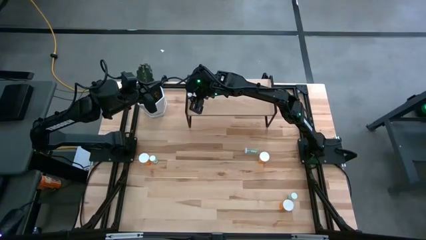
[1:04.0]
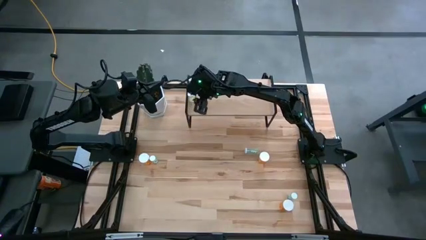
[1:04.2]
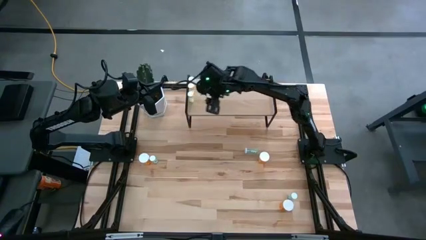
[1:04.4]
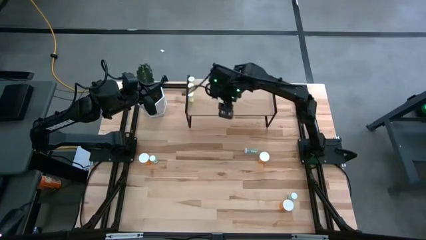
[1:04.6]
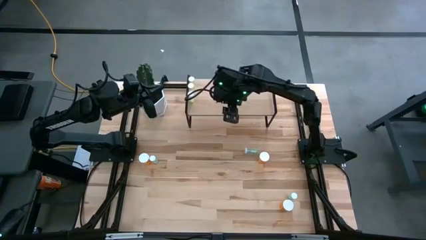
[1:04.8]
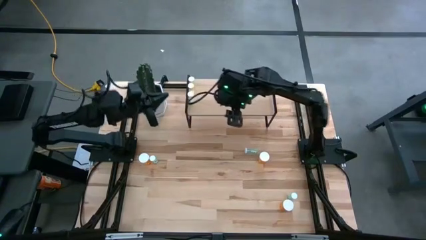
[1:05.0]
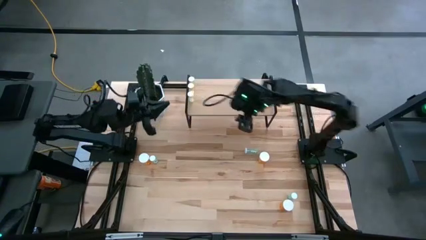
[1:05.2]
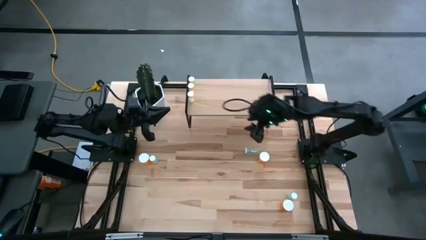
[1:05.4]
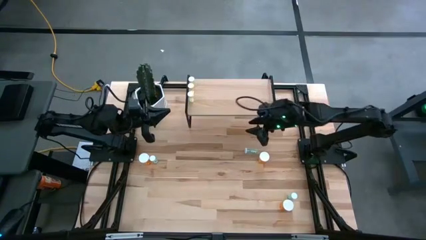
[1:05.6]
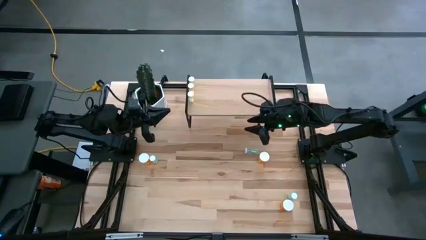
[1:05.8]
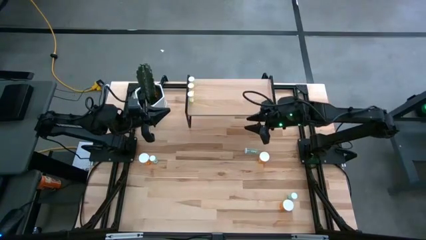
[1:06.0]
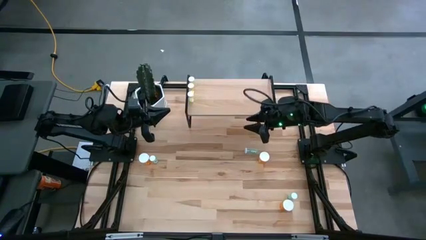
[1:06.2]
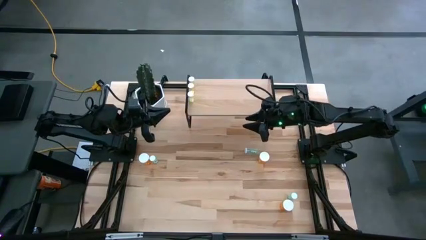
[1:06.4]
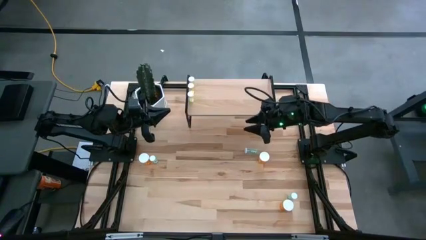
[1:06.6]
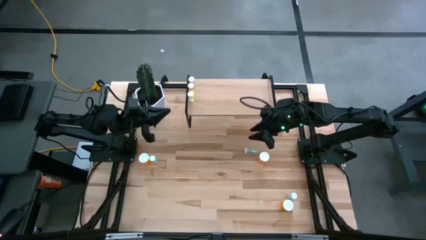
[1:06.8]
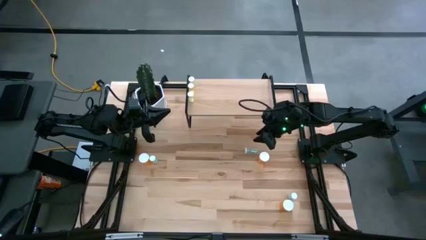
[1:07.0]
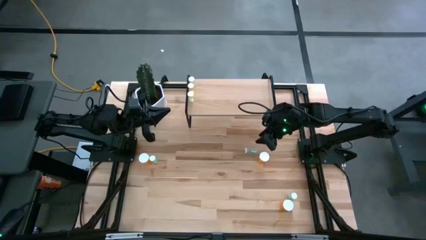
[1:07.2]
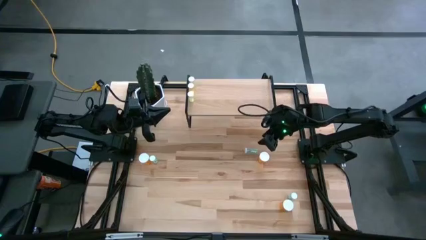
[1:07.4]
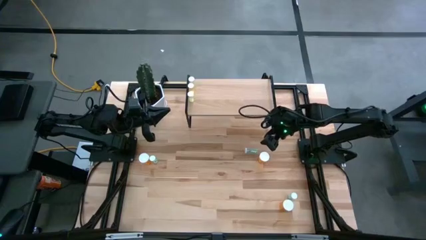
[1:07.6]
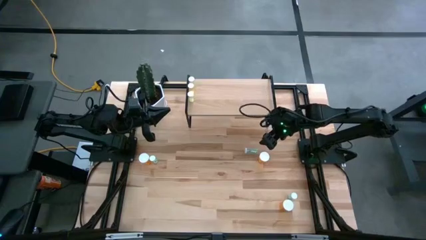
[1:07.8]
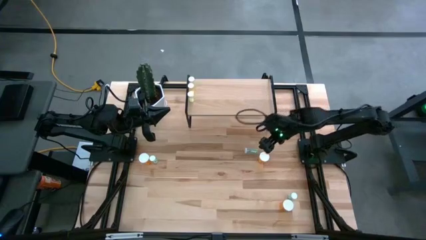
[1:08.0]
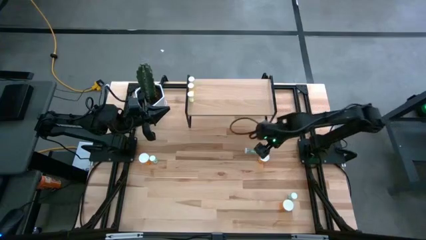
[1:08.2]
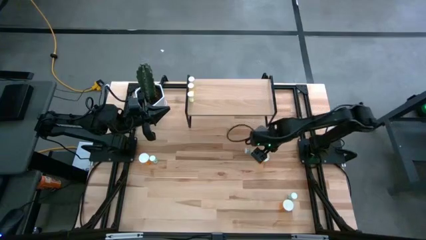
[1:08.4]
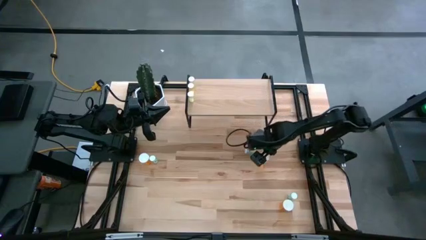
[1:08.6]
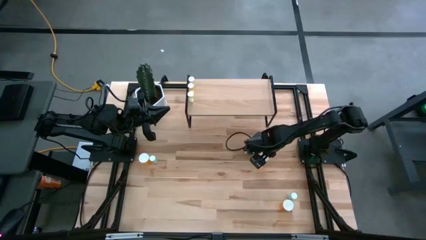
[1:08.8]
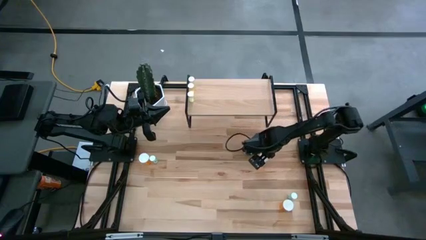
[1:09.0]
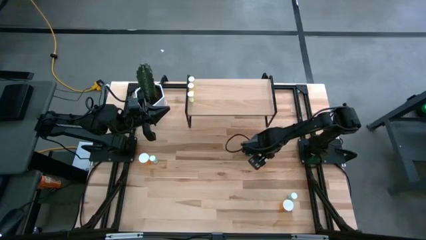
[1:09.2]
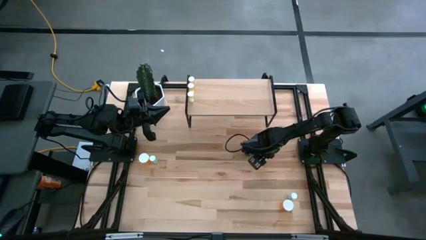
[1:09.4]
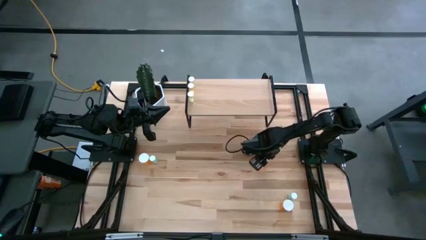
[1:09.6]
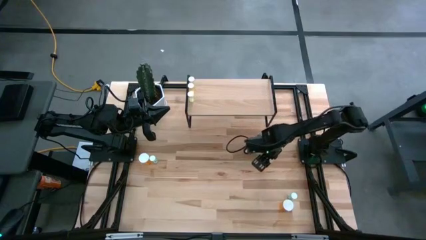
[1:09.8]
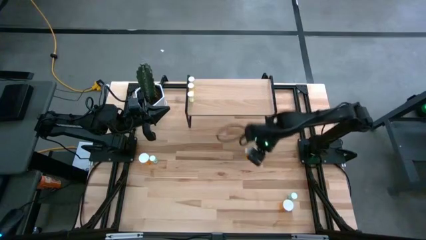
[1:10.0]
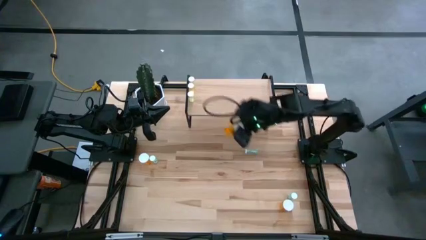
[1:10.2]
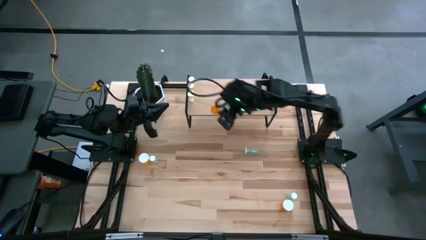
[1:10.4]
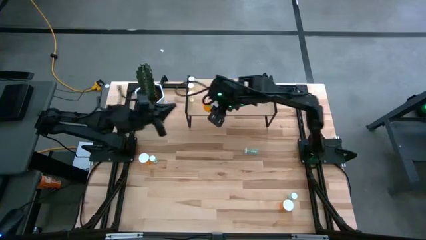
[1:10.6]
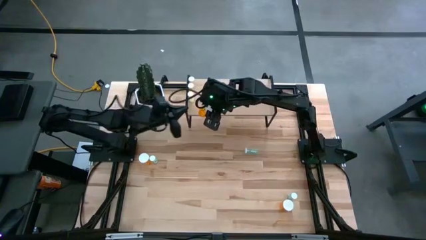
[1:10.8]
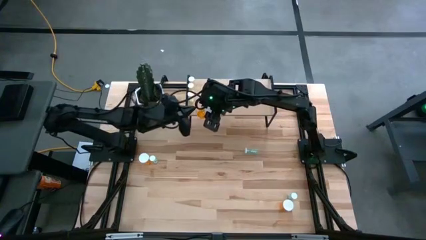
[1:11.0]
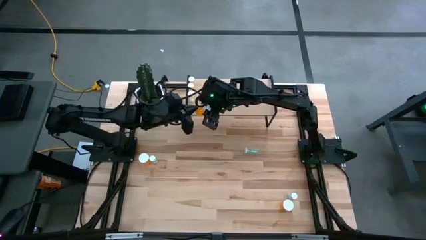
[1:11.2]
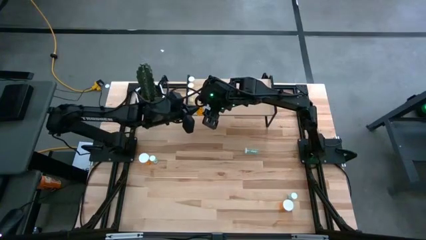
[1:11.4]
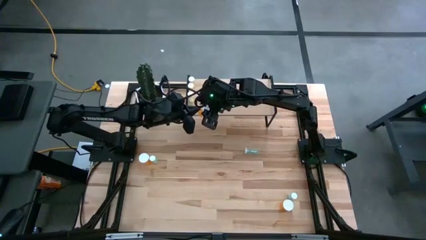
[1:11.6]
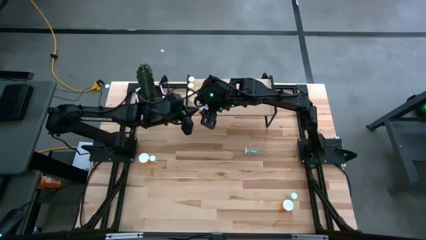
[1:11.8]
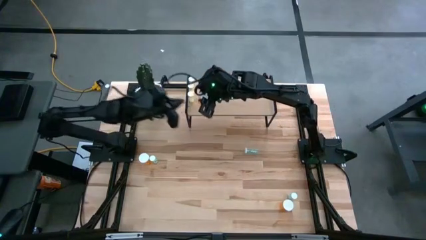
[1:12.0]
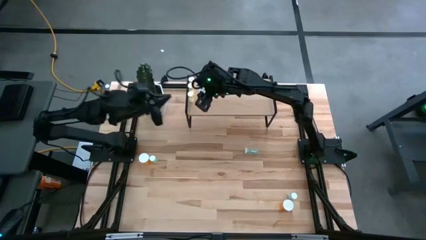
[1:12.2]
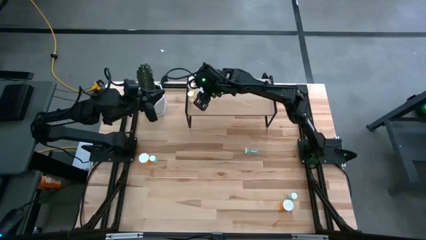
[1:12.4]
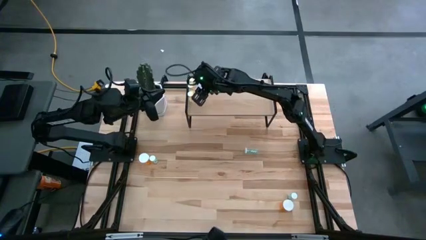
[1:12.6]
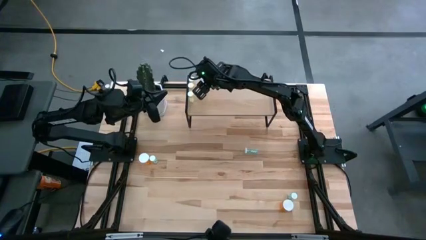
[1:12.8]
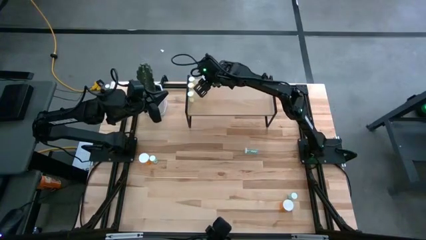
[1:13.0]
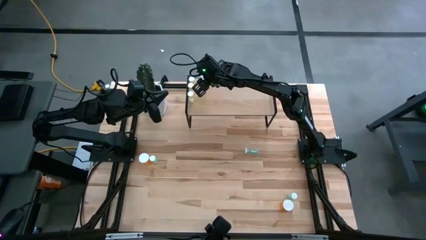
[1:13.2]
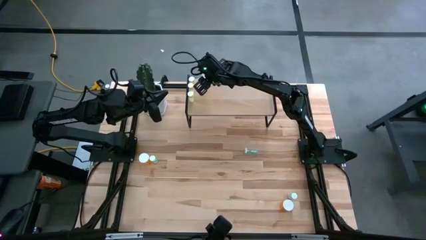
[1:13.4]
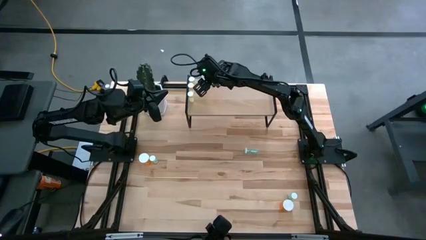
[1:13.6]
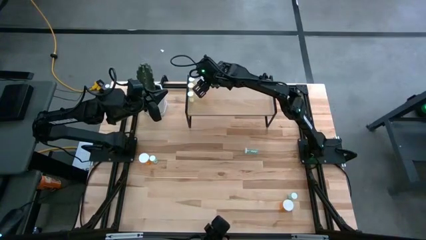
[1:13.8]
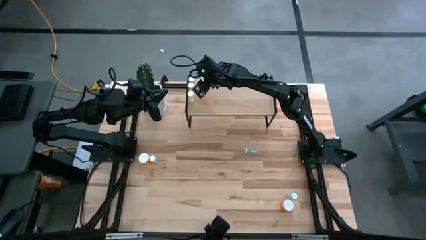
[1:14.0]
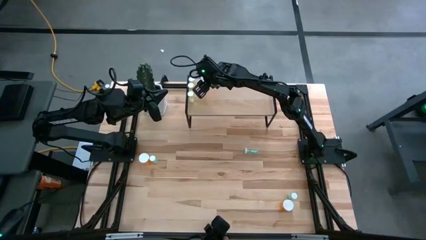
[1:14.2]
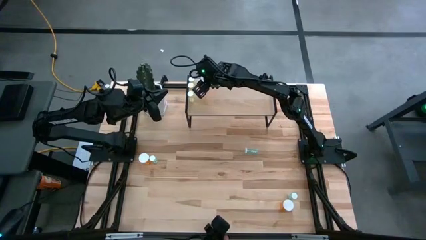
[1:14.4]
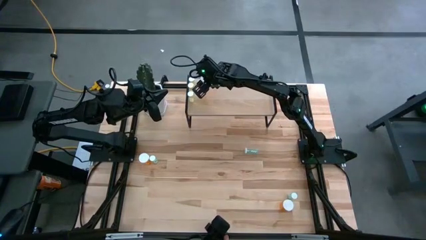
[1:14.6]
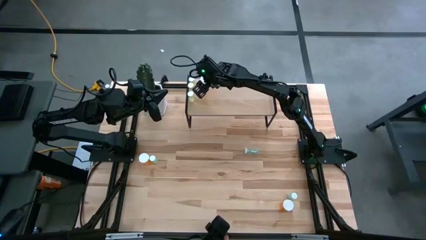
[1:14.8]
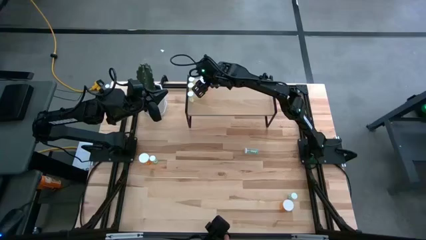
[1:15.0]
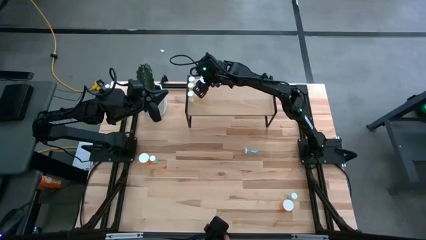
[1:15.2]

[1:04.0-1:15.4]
Task: Pick and place medicine bottles onto shelf by color
Put the top right orange pill bottle on the shelf

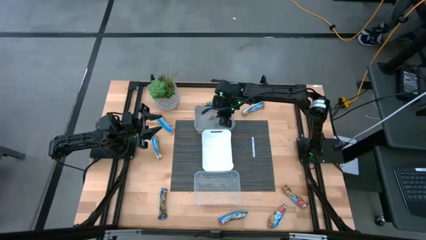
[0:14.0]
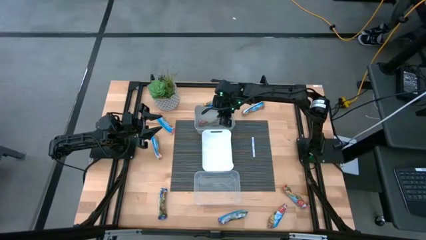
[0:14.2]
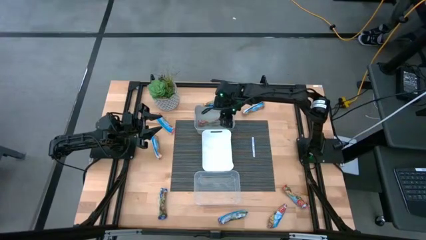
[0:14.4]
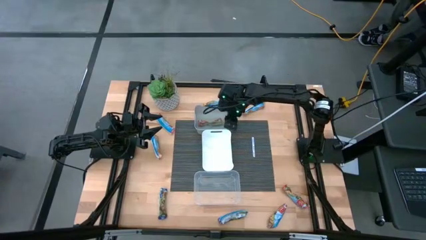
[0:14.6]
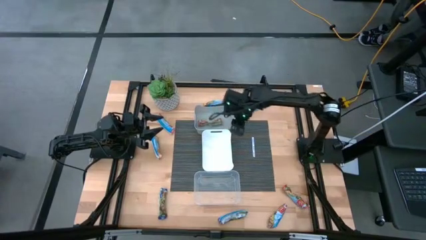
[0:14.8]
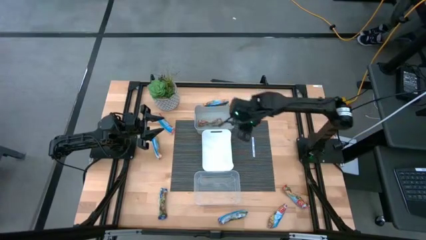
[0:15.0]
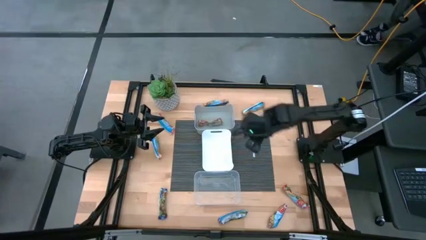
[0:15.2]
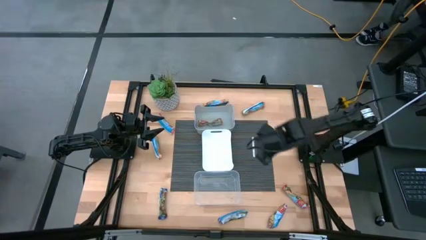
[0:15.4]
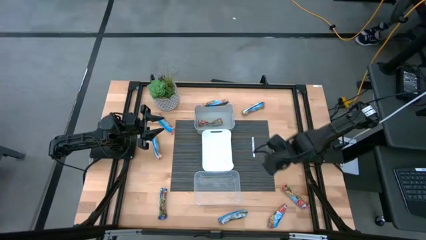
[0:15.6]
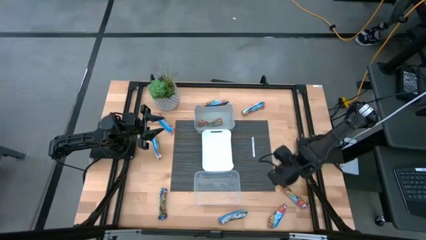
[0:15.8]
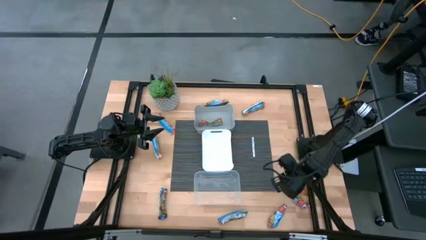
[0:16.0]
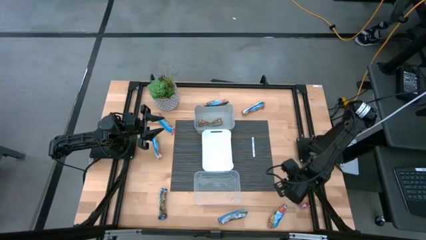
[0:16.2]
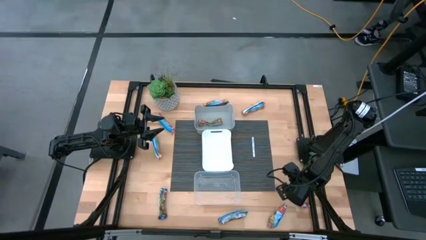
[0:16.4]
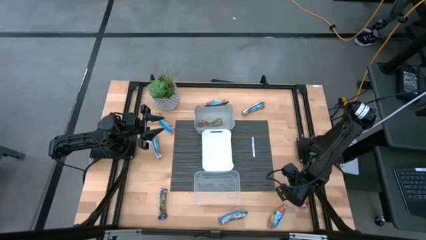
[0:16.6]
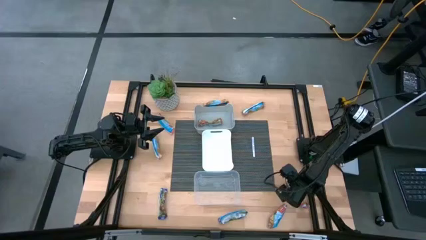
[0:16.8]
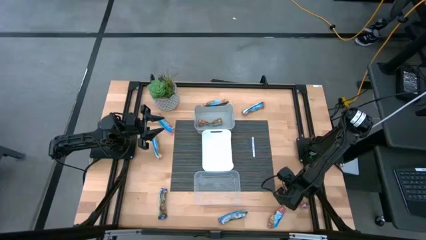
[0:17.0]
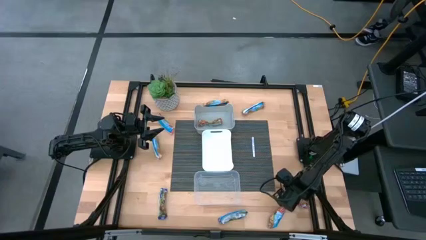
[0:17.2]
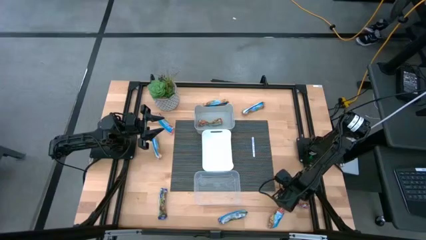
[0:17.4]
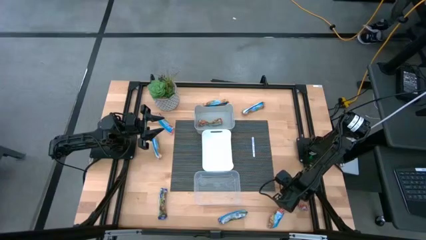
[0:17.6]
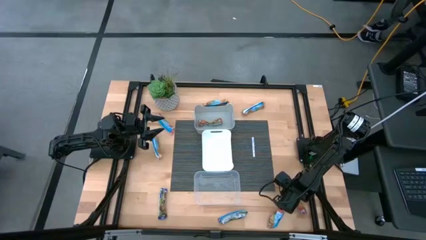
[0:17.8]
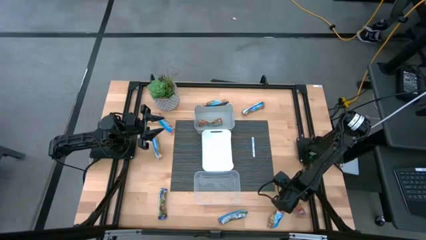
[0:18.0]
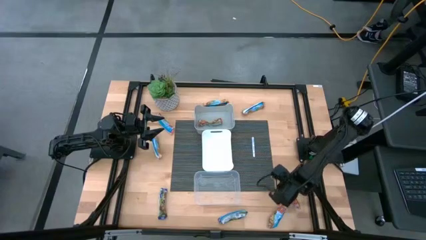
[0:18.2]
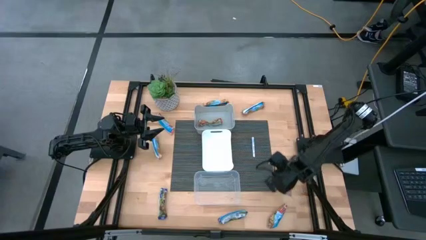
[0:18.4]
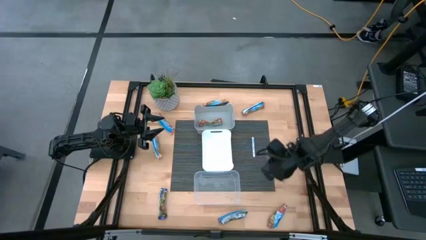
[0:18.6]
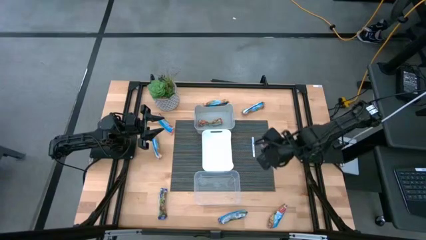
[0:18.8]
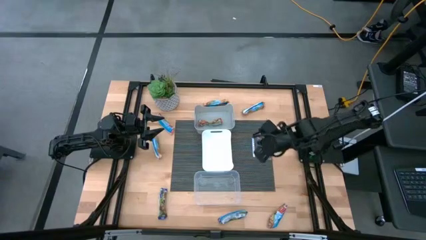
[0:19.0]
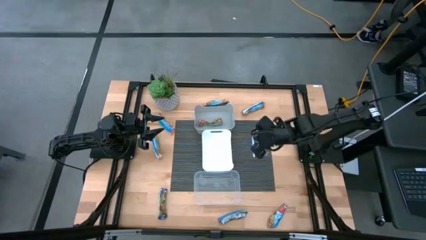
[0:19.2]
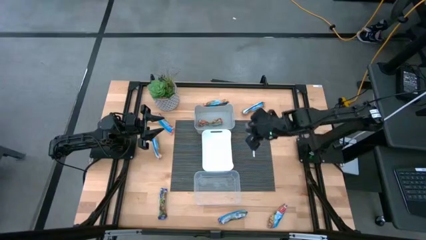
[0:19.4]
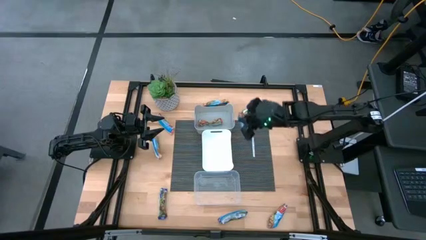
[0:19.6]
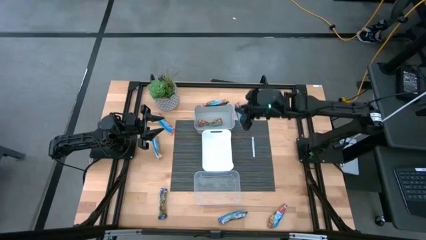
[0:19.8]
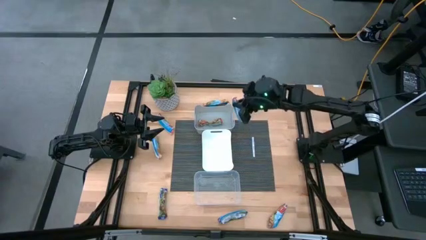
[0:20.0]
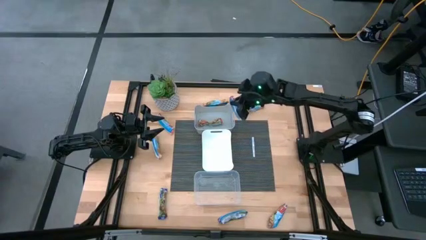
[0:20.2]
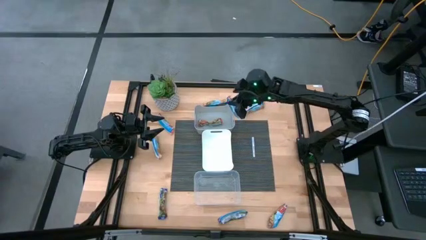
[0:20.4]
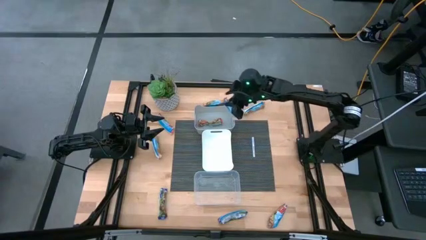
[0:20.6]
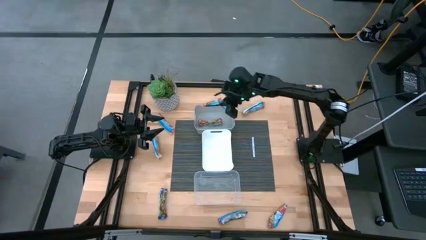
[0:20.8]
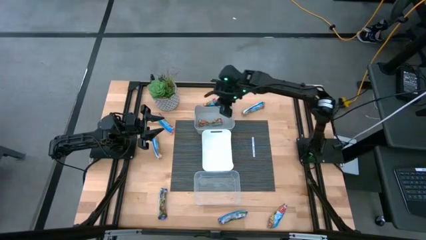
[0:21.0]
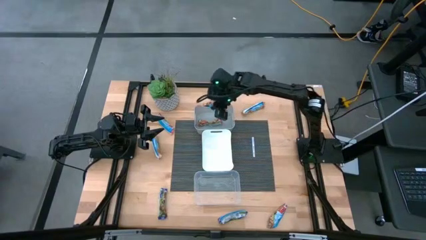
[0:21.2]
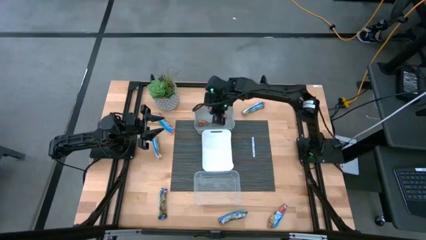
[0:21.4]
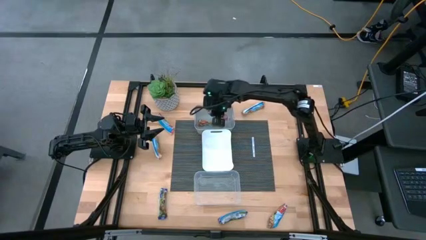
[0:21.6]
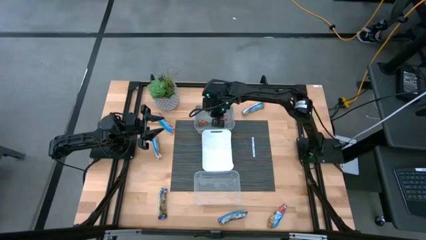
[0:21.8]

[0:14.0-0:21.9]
Task: Pick and place Granola Bars by type
Put the middle red granola bar into the gray bin
